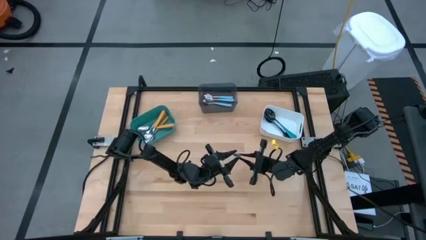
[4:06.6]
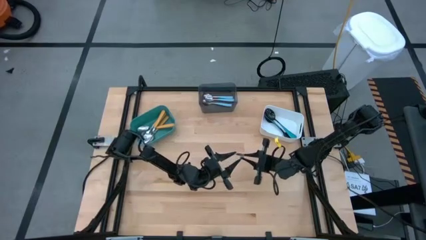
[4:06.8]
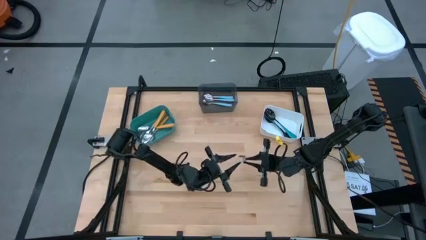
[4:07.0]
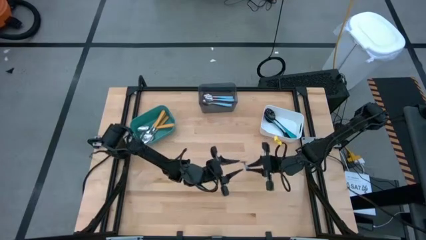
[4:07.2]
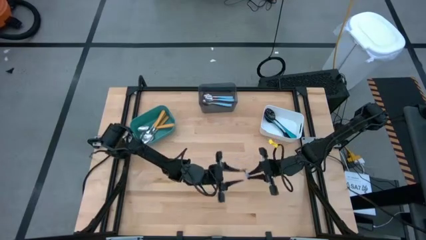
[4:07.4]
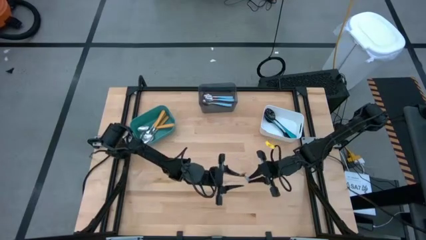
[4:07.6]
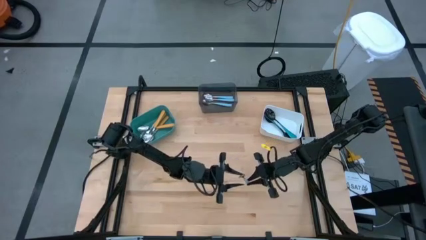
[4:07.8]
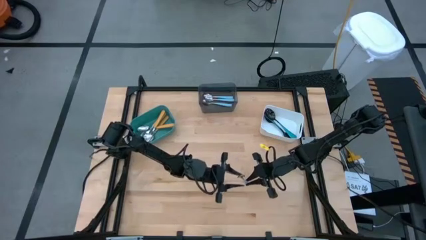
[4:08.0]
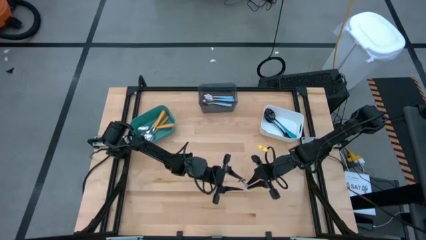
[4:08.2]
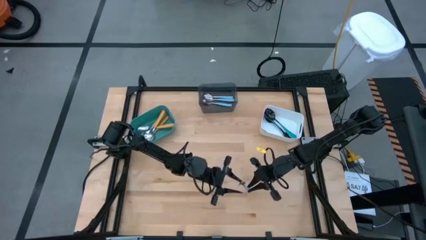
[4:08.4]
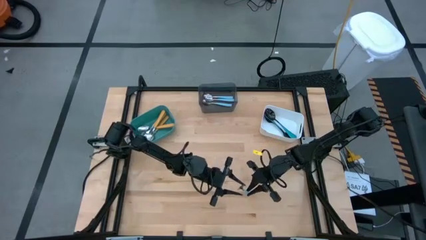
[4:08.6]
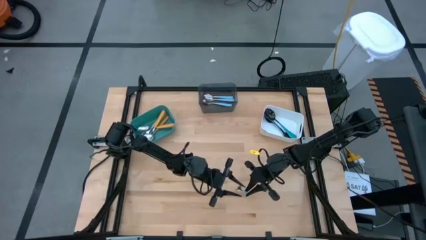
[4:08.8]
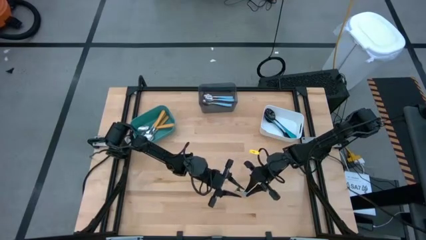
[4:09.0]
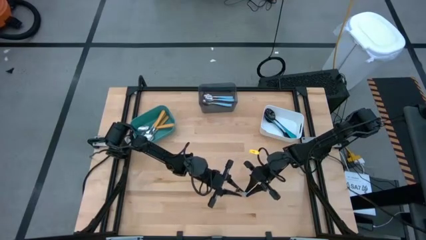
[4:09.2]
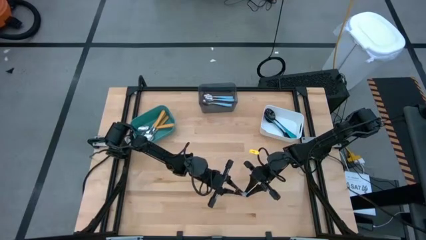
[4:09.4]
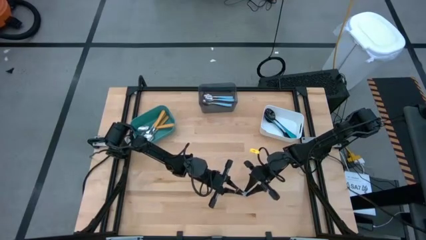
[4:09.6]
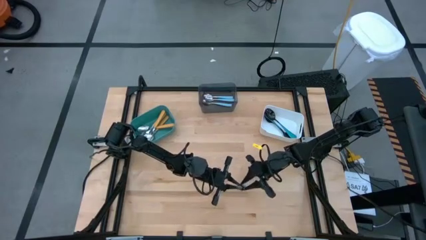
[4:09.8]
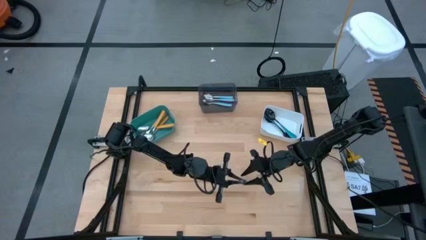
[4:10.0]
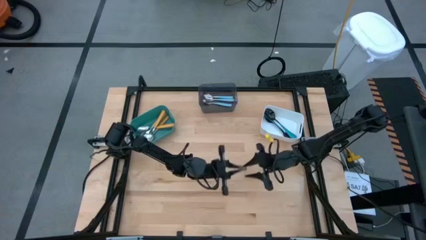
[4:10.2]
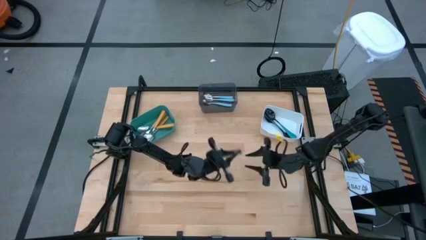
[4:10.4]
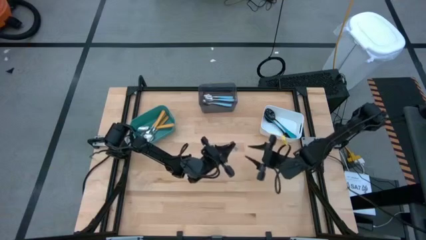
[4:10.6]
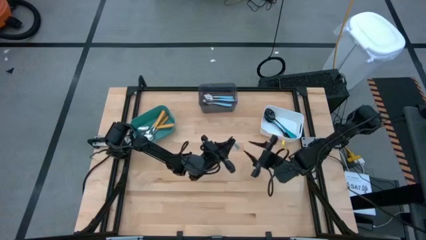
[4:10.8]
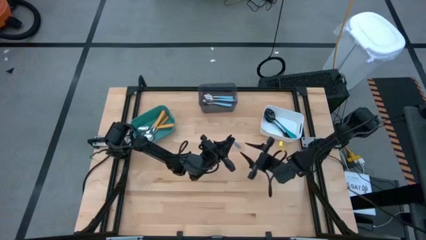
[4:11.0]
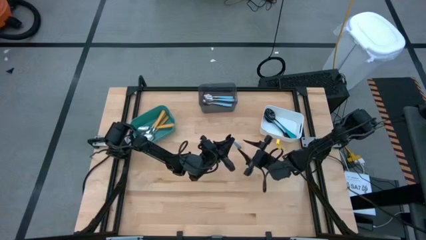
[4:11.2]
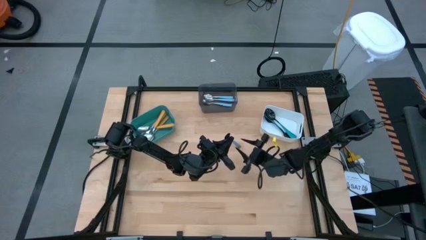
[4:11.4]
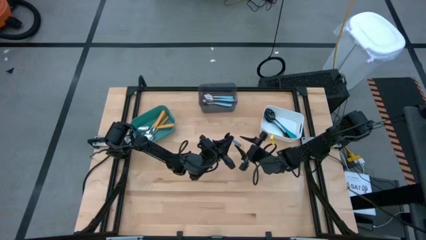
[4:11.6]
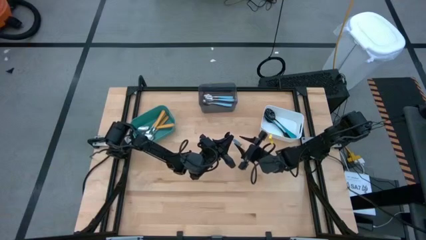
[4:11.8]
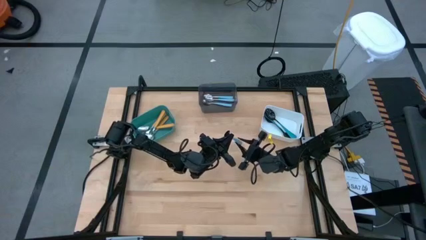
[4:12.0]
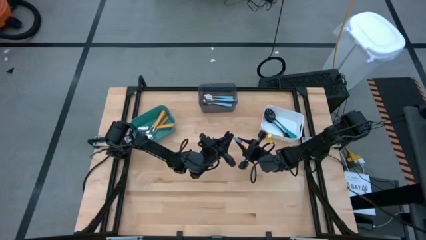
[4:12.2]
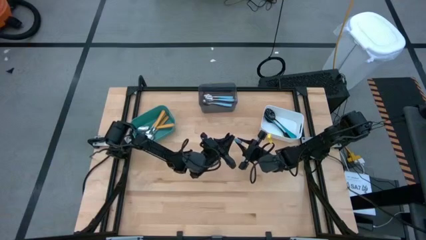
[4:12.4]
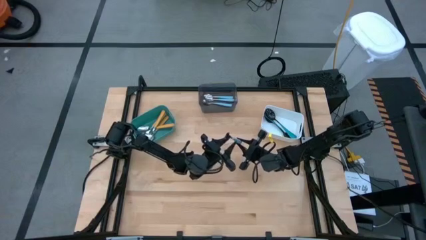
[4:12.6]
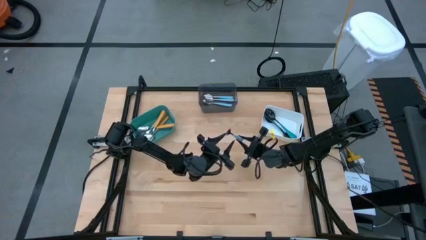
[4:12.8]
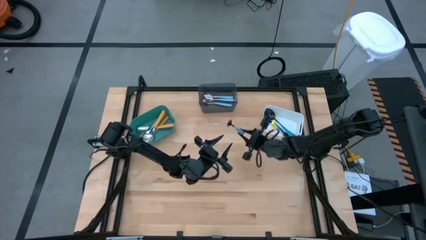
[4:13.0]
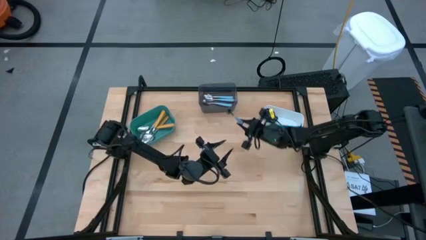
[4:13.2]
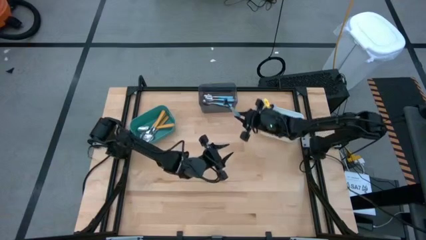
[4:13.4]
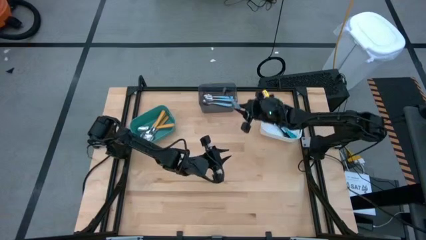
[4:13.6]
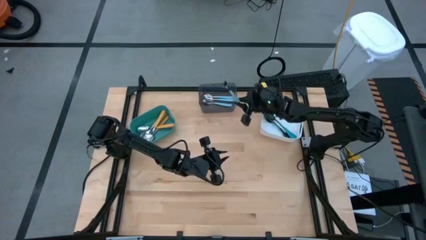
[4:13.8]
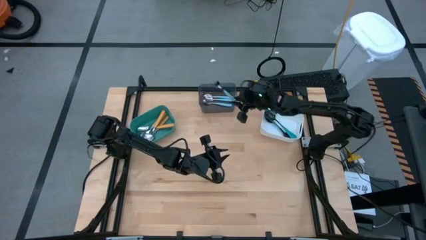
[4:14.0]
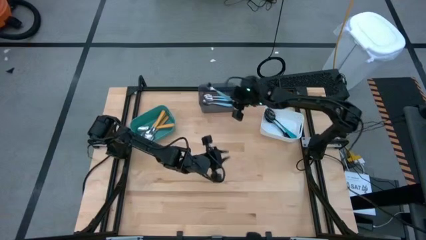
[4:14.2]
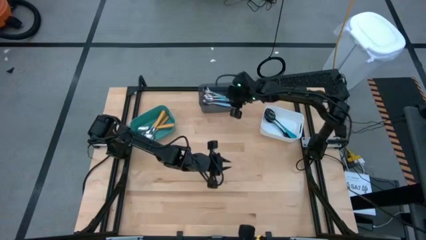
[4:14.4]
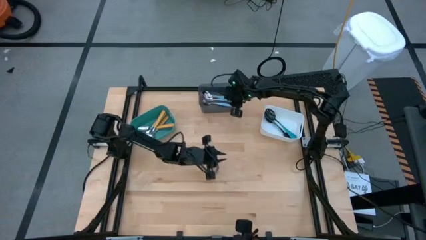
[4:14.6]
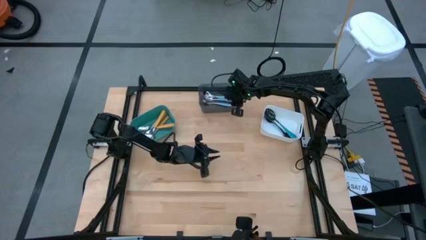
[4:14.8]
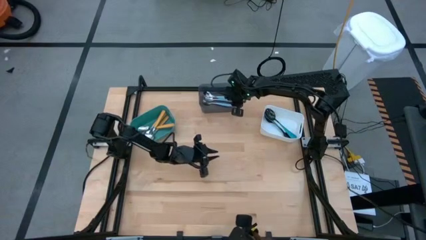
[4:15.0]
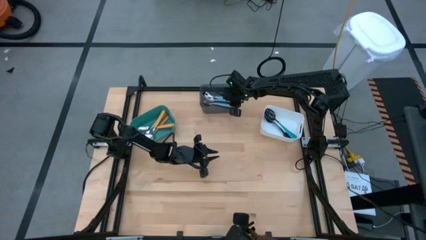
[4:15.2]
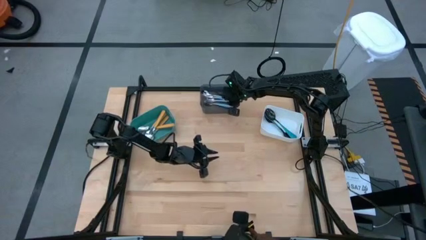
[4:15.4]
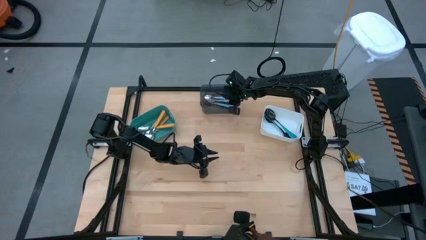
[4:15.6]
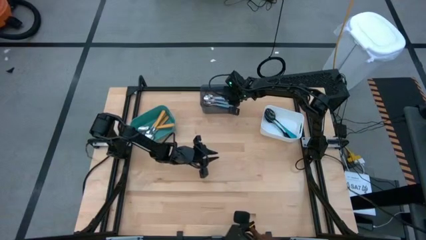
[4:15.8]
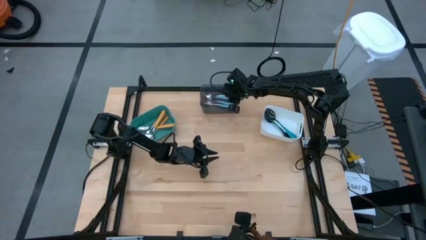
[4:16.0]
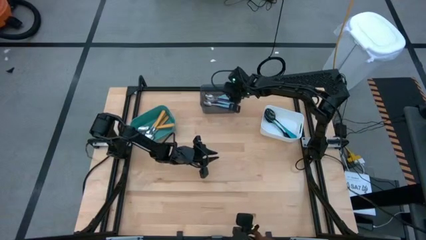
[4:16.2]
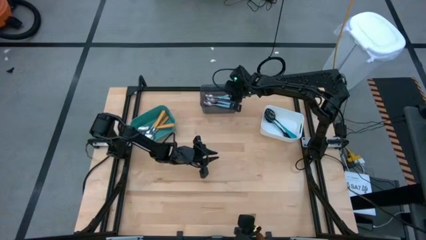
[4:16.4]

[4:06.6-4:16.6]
Task: Sort silverware by color (type)
Put the light blue spoon into the black bin

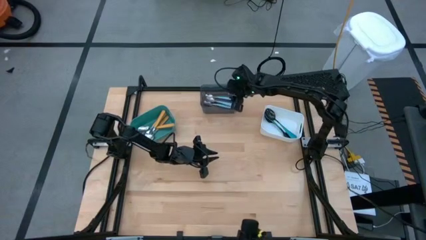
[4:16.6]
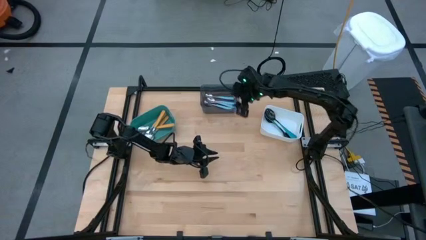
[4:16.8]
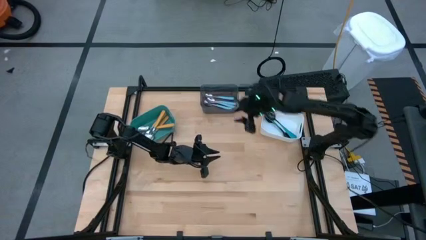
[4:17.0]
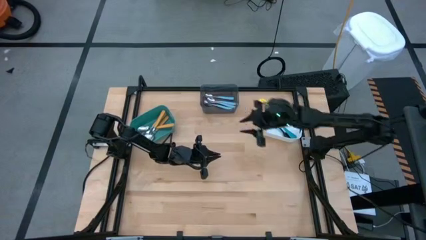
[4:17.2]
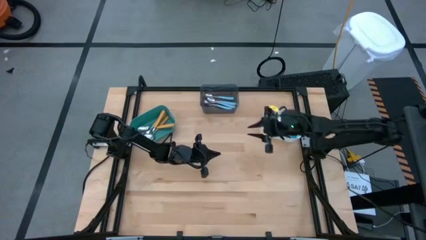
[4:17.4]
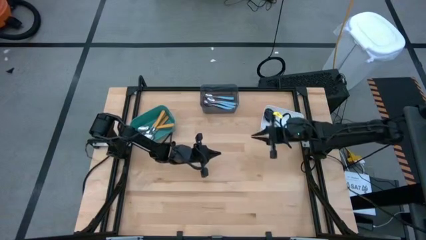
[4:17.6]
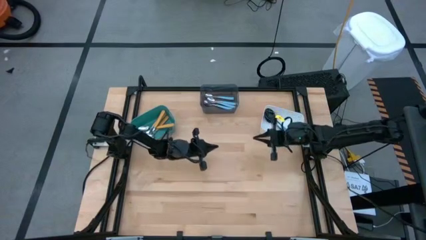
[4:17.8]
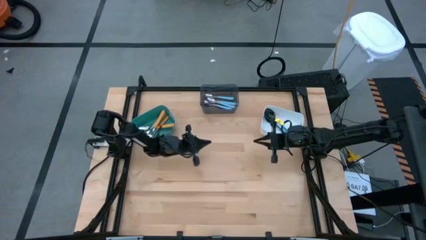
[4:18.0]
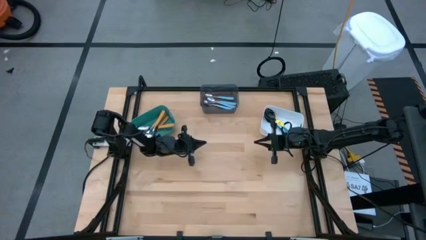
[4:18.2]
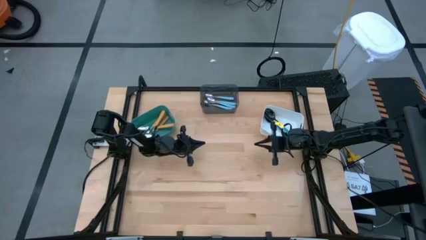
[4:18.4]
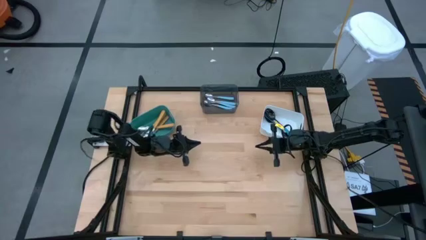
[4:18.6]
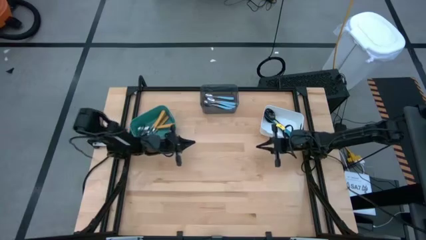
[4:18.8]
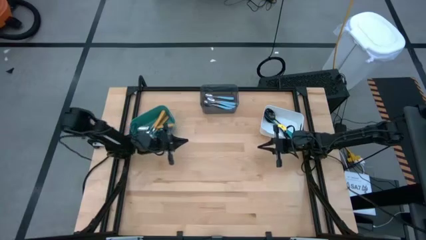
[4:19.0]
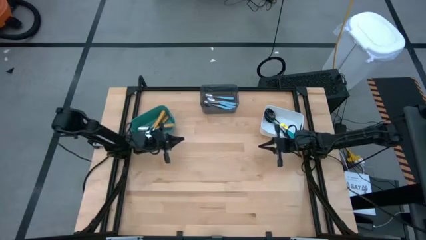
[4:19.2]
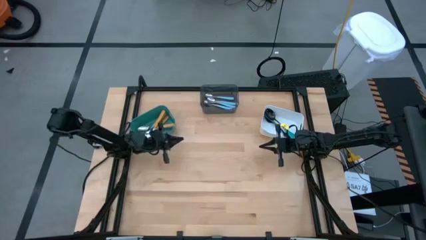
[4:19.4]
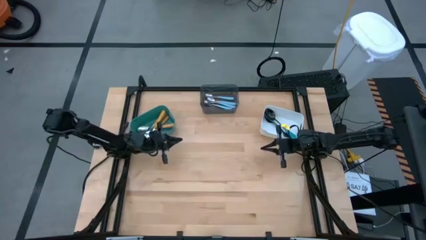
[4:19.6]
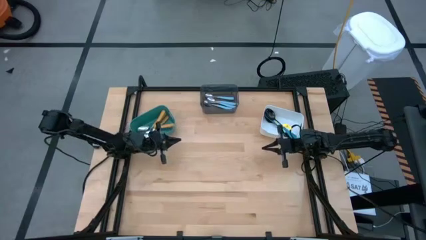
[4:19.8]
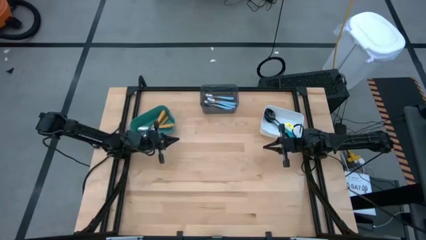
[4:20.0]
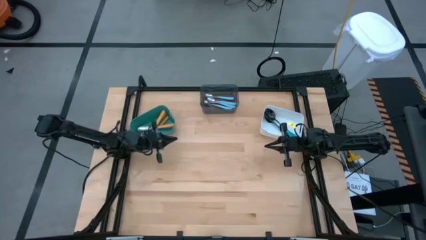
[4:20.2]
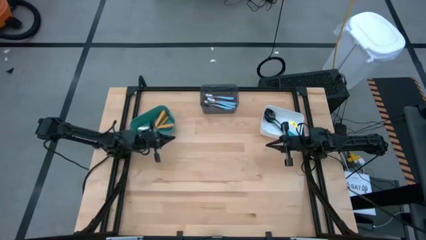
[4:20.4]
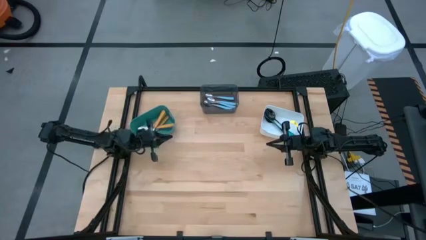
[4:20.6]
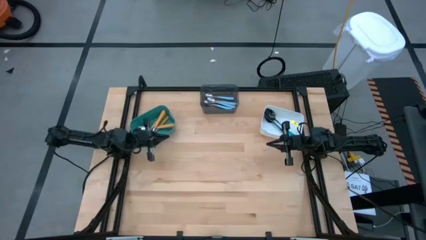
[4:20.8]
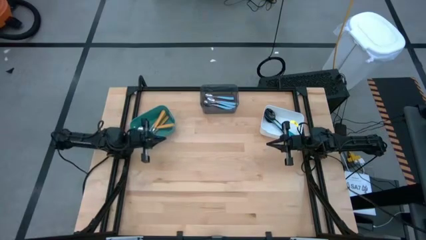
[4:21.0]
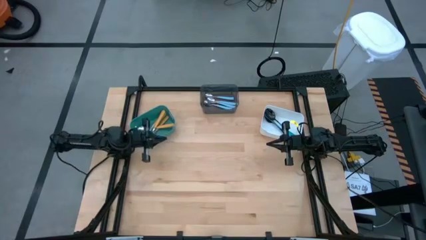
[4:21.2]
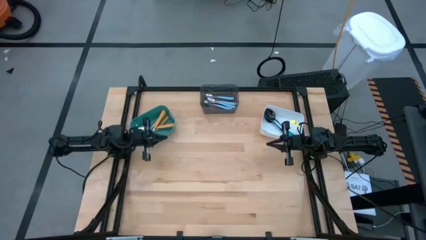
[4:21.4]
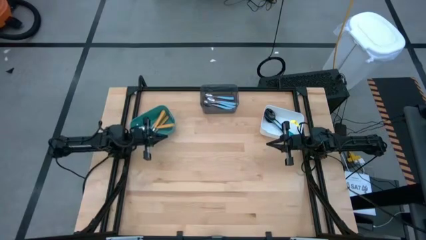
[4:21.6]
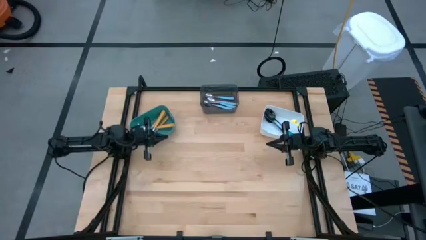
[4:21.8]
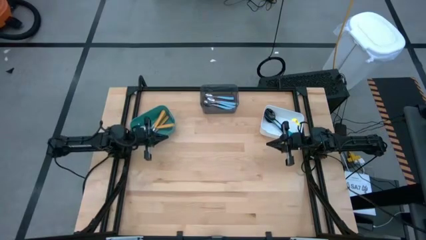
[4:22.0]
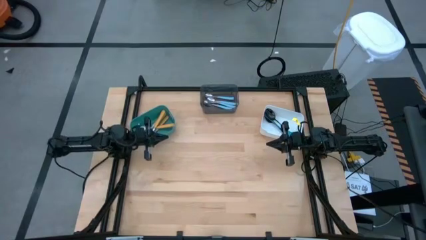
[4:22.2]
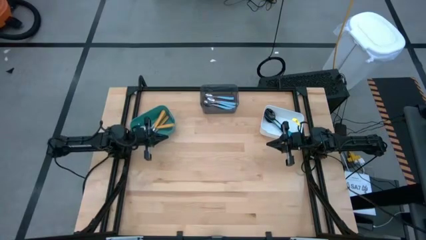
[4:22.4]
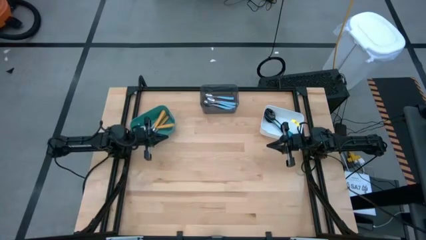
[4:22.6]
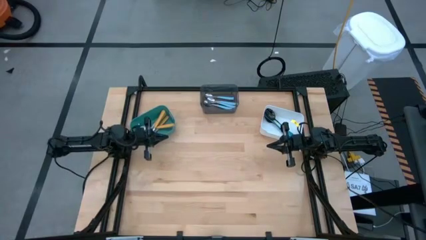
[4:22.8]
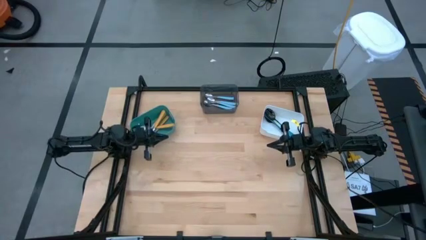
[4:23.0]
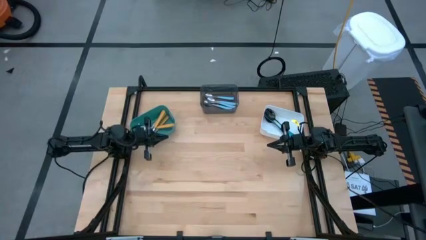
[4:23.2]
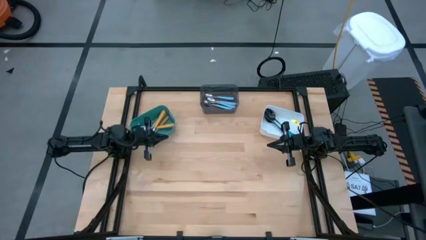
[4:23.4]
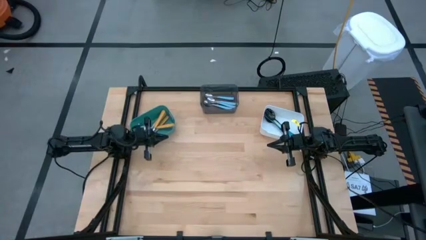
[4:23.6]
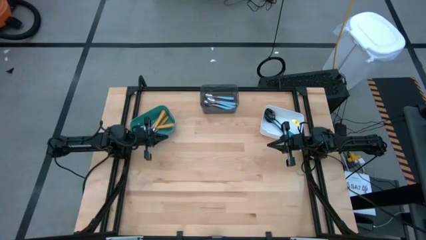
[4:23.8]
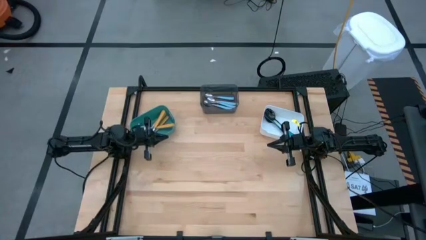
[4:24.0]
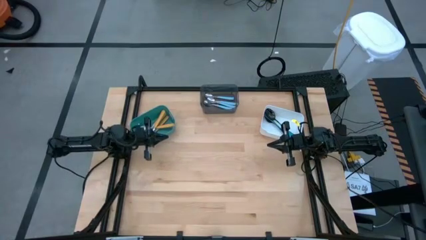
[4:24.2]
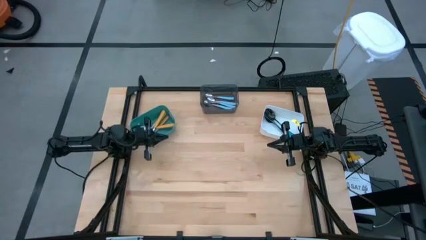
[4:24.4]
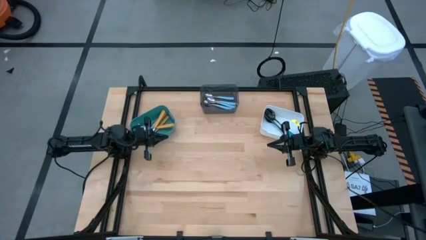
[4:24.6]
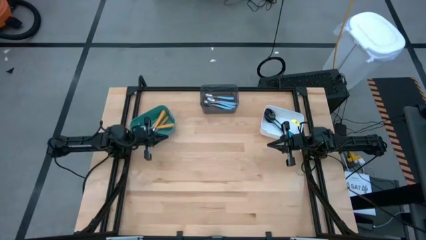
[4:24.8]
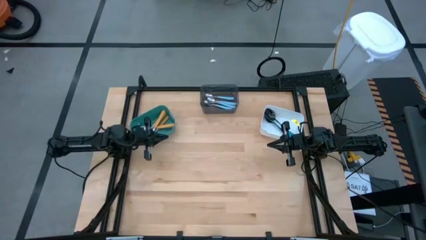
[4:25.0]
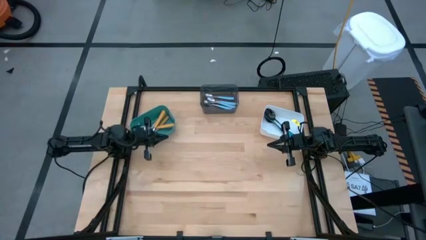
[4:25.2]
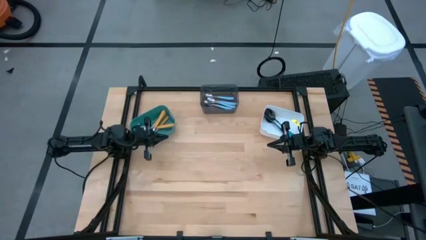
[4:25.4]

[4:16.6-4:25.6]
Return to Home Position
